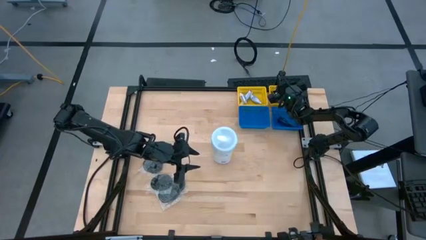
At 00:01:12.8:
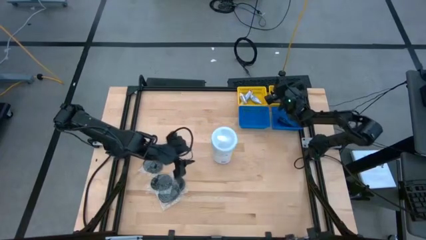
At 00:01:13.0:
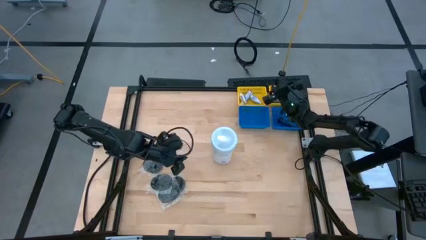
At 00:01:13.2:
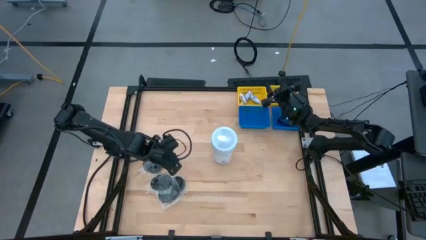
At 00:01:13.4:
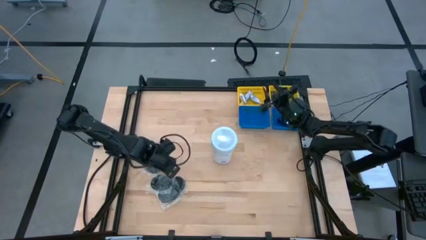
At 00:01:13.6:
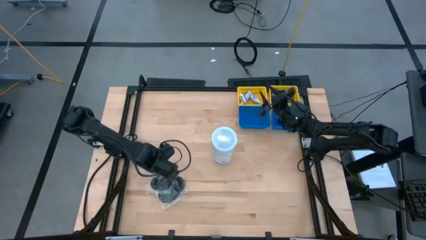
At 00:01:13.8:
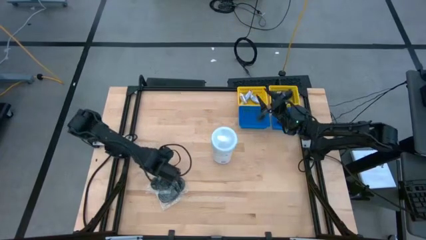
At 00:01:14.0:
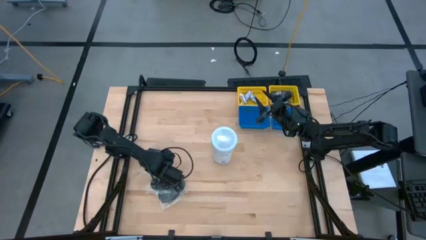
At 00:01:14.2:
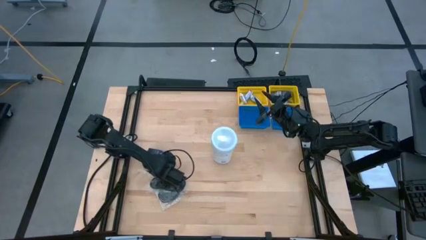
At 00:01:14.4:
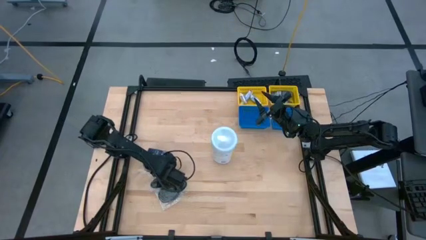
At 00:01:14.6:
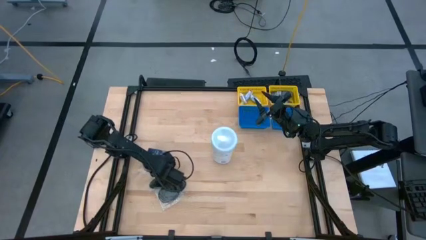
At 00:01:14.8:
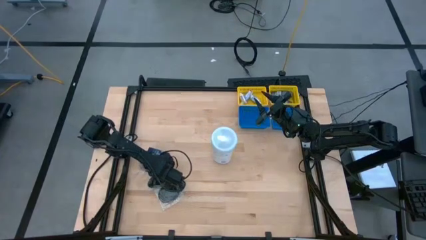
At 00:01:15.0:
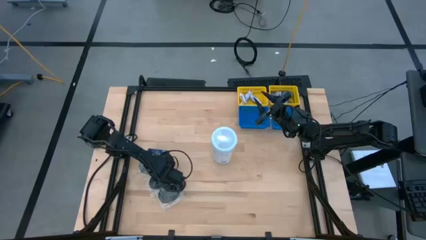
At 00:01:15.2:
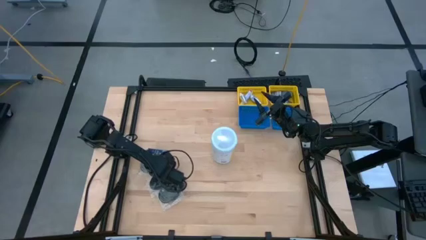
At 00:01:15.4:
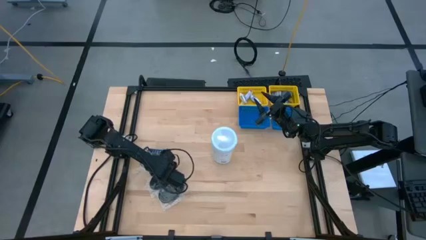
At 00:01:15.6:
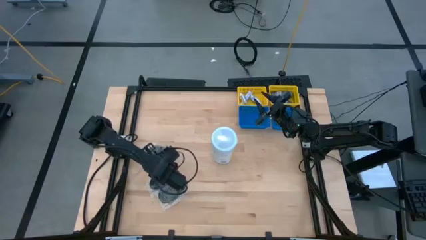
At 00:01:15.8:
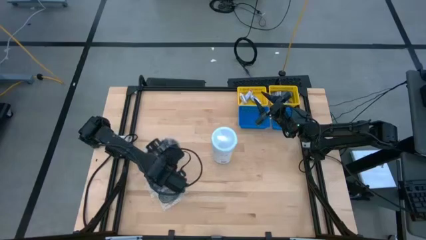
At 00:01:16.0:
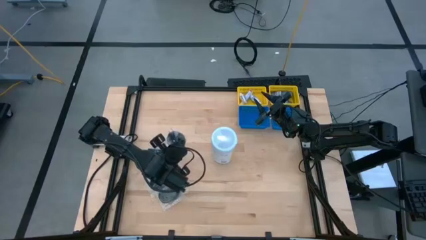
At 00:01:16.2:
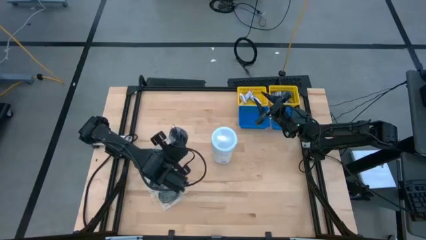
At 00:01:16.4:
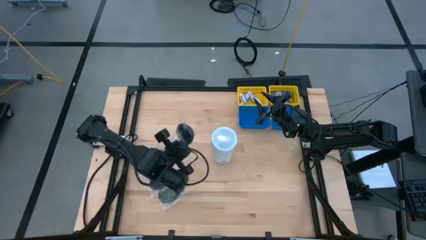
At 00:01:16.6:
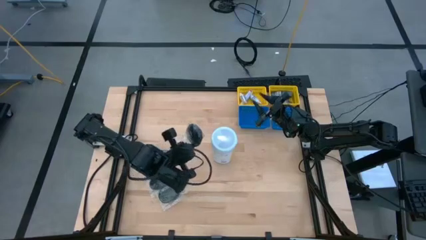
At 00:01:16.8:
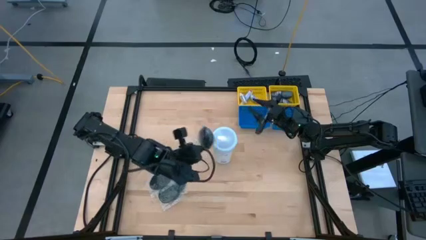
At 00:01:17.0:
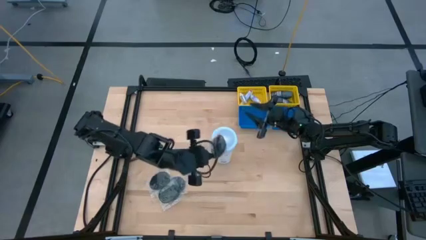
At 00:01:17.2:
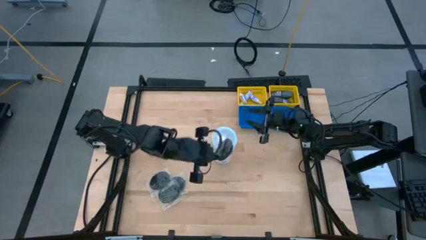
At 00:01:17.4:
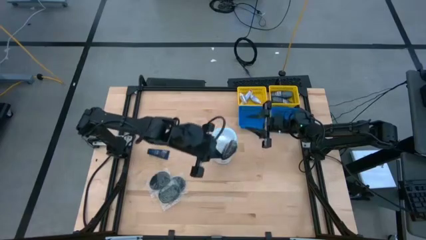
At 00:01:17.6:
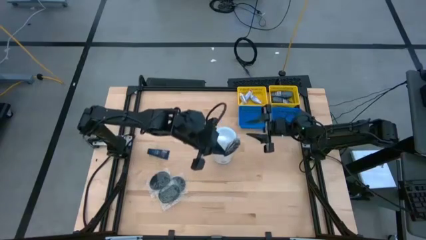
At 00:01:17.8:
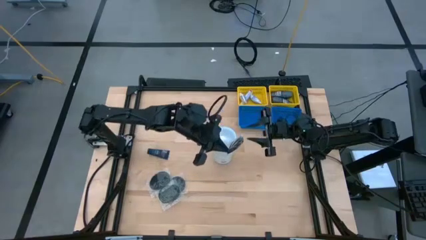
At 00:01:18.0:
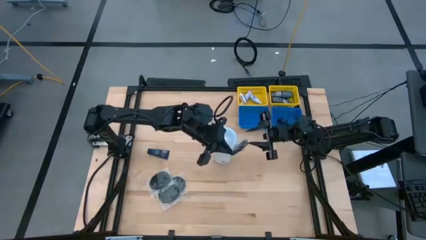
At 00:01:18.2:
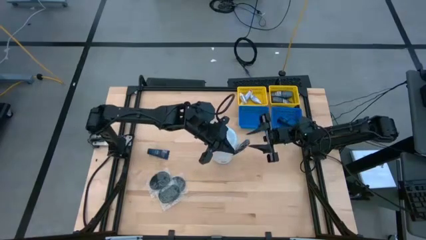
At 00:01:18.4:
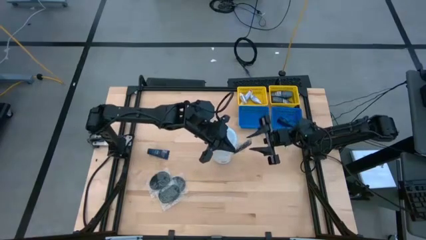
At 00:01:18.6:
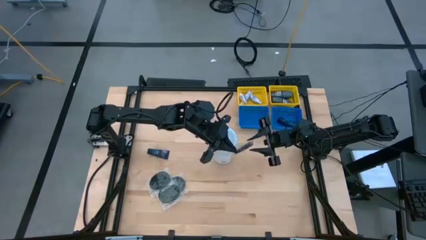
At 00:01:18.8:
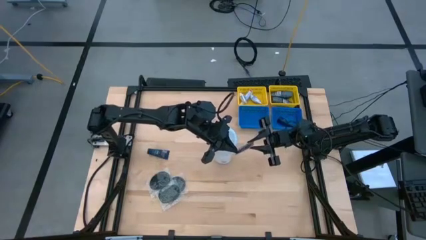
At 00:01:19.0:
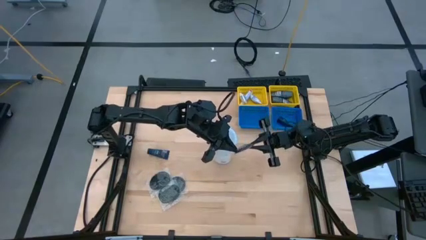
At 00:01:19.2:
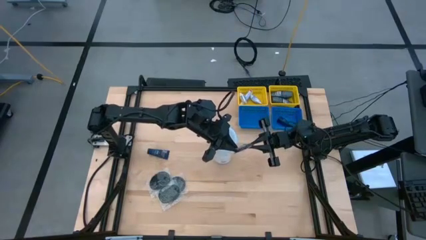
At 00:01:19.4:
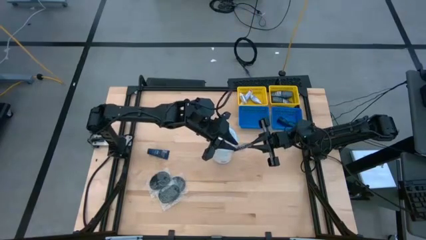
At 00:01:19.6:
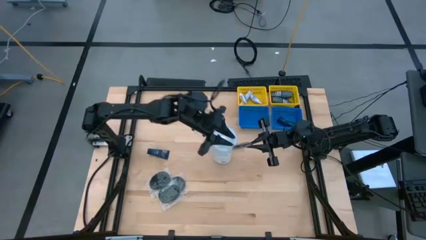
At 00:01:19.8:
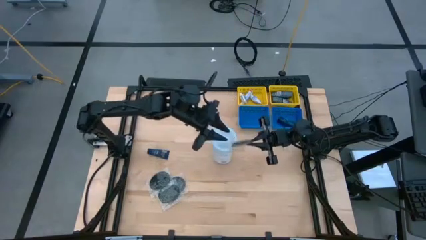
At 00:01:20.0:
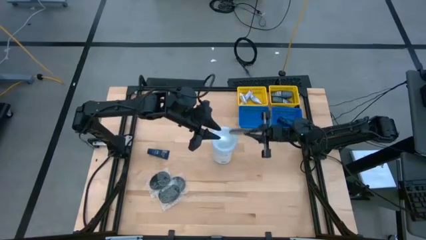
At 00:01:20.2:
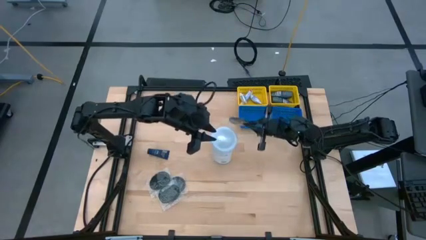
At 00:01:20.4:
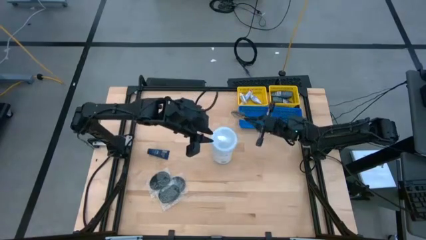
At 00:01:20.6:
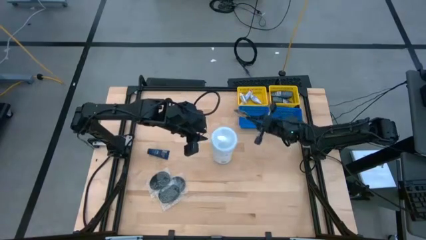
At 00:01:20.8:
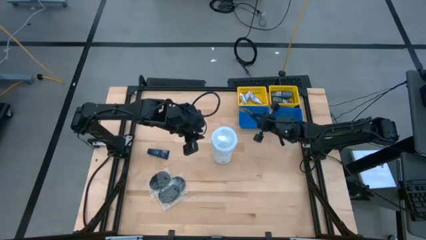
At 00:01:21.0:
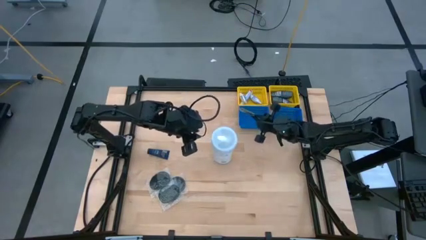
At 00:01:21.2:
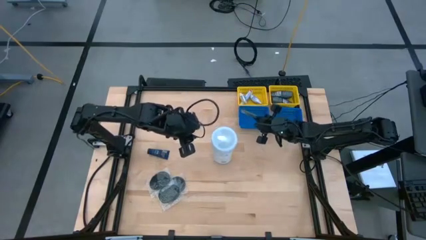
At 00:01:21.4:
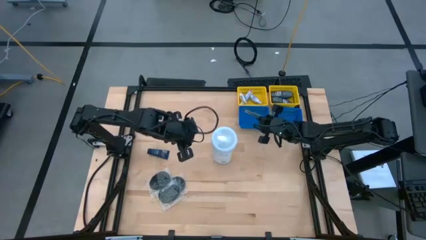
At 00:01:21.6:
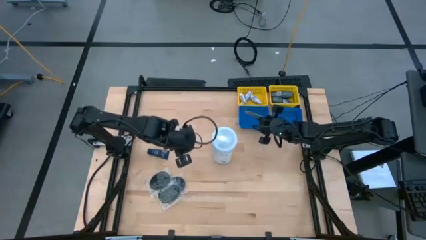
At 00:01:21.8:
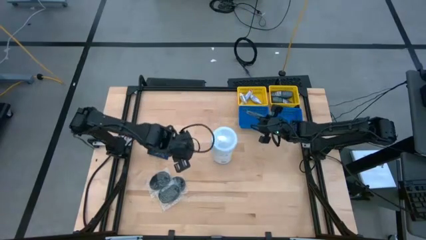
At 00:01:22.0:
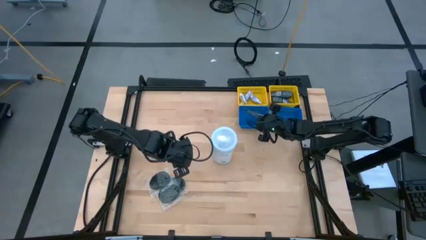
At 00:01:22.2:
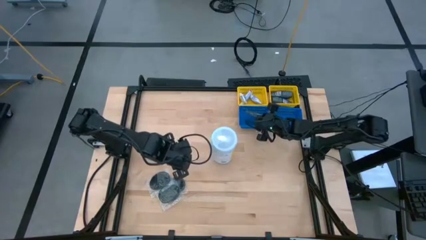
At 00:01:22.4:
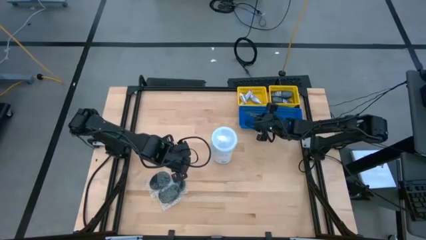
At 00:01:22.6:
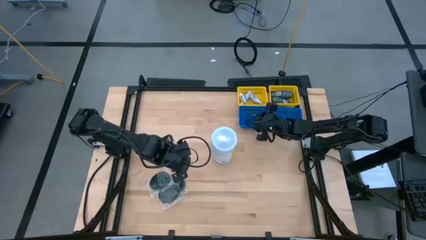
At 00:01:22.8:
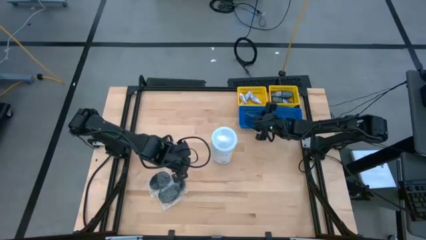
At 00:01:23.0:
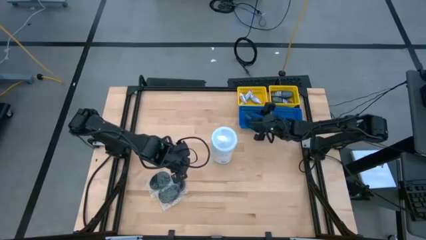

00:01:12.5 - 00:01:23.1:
Task: Pick & Place Travel size toiletries
Put the black hair brush into the left blue bin

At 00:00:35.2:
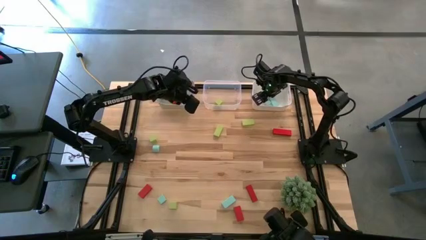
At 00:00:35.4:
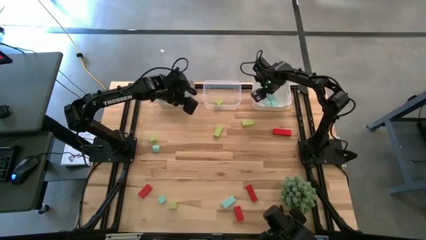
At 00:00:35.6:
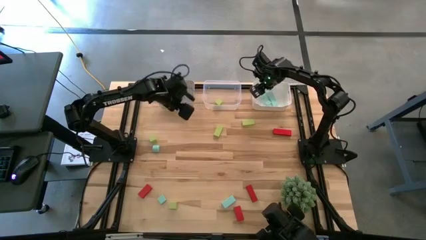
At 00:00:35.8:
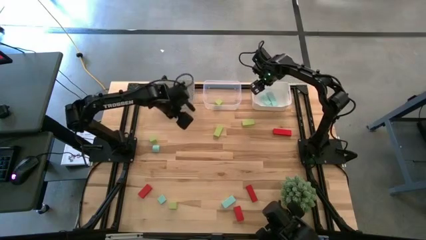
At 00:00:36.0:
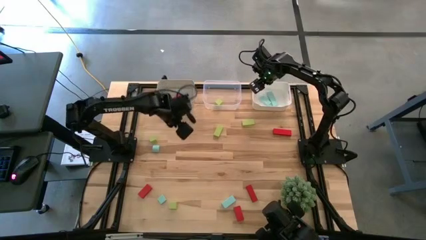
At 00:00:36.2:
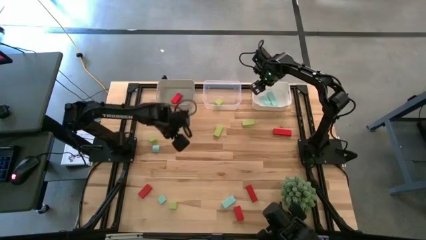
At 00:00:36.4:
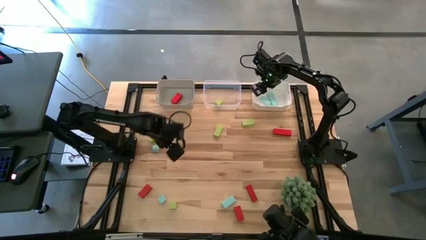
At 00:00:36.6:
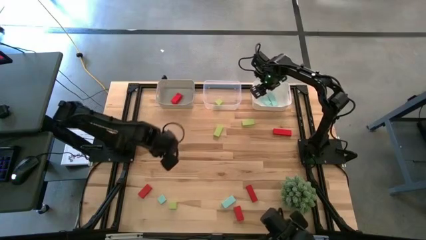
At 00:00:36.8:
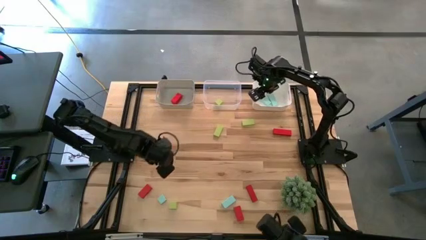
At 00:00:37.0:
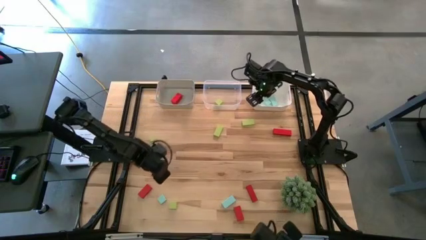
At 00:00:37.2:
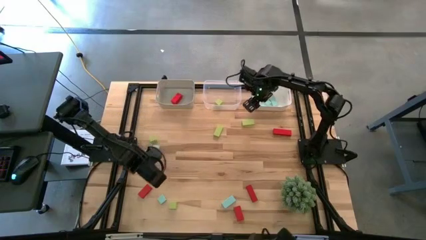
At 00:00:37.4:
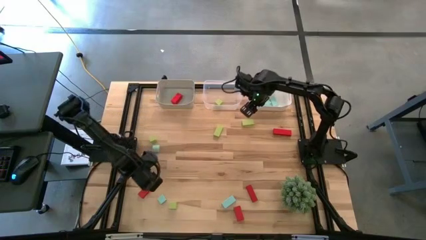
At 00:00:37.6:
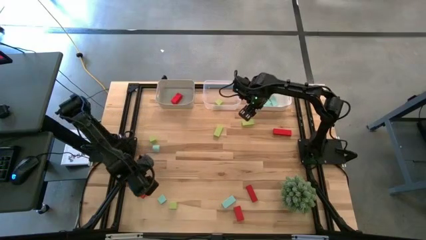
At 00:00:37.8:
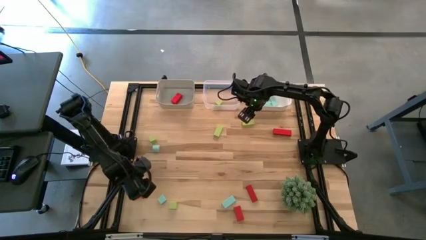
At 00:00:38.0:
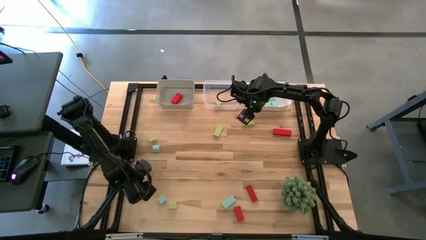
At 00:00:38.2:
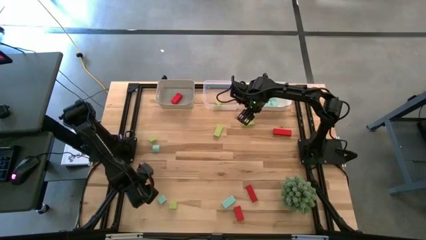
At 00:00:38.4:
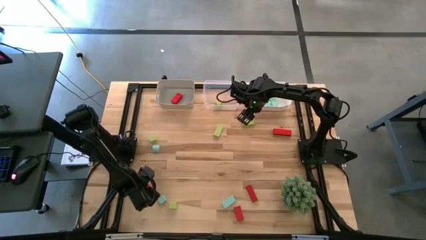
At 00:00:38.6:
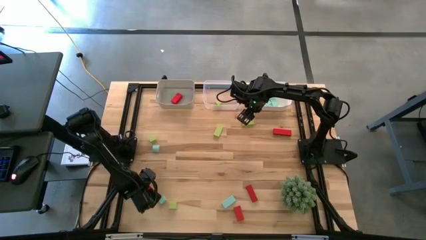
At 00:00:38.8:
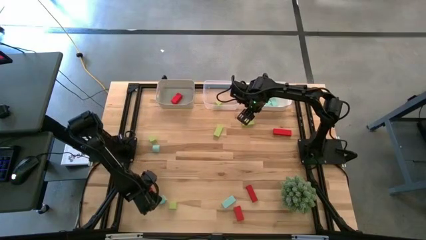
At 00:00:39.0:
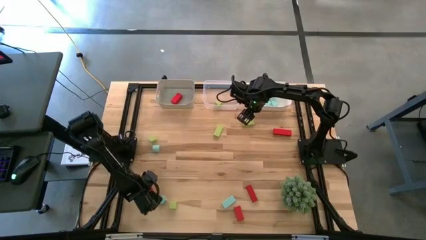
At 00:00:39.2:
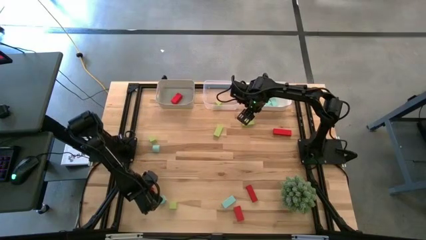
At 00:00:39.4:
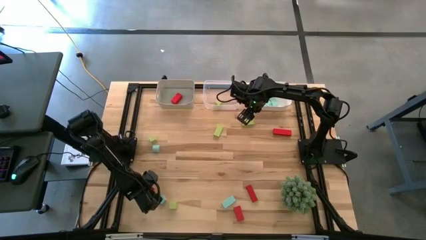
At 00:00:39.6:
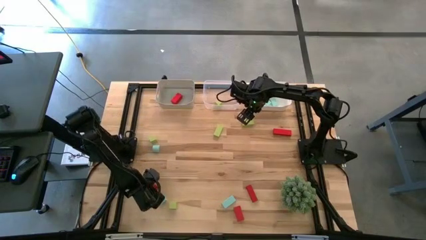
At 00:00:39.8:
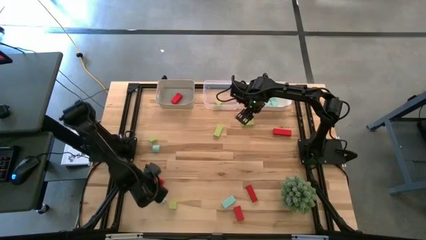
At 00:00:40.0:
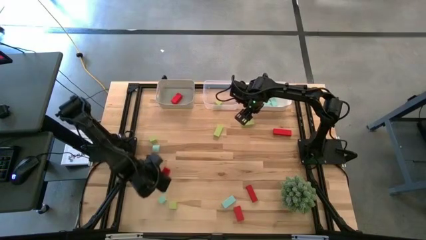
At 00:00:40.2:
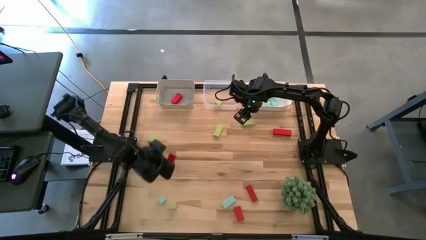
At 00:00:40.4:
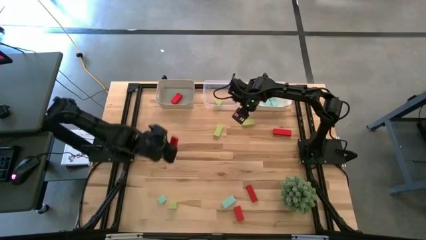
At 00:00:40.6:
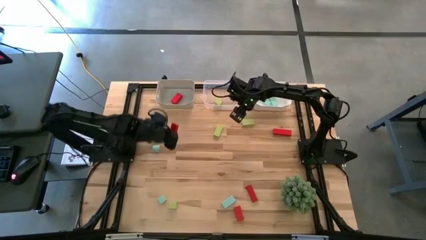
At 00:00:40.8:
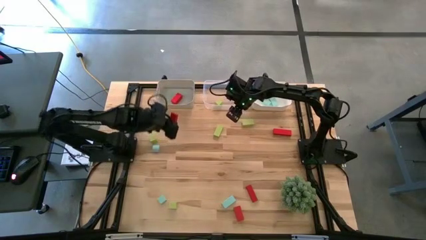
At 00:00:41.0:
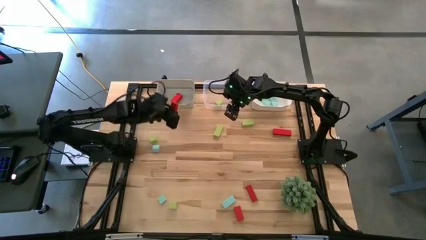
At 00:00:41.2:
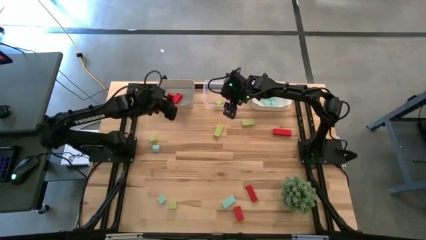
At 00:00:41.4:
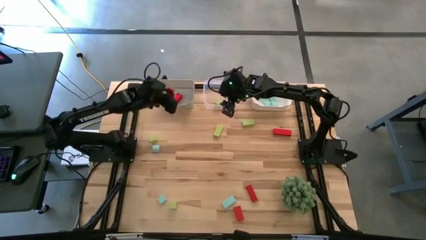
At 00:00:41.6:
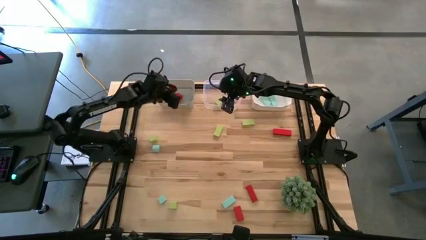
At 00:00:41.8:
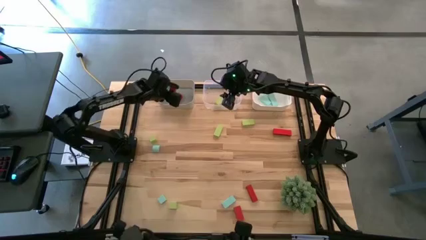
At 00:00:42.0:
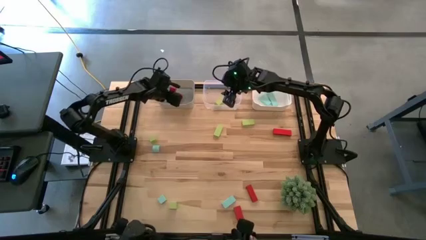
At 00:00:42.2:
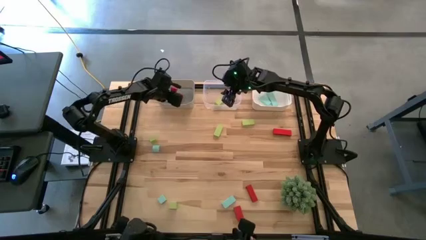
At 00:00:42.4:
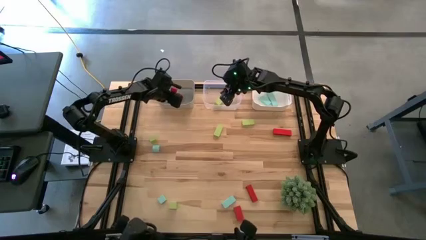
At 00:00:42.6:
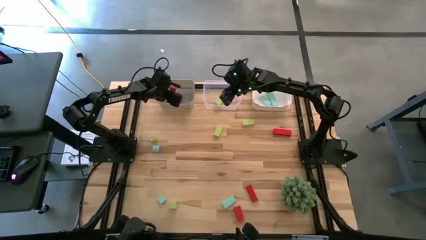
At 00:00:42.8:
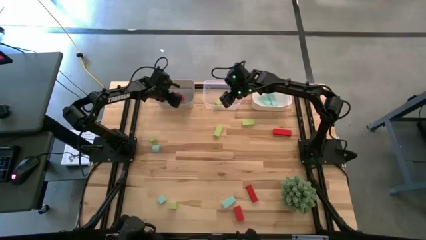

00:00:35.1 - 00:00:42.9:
Task: Sort & place blocks by color
Put the red block into the gray bin
